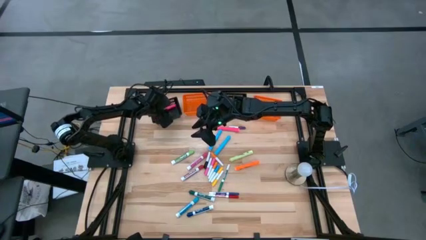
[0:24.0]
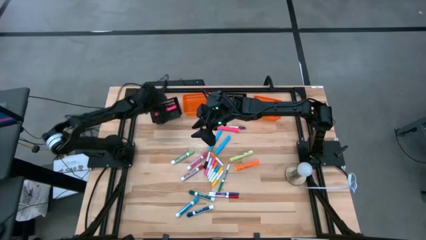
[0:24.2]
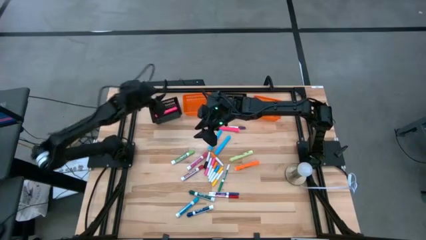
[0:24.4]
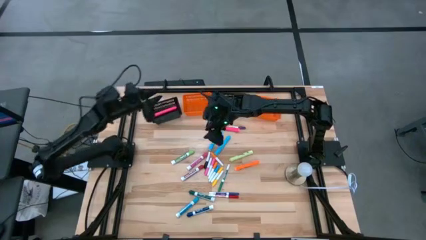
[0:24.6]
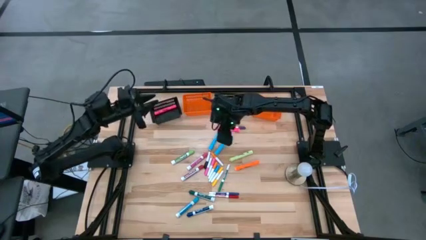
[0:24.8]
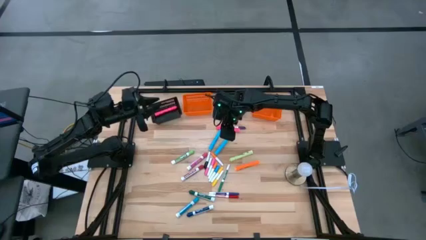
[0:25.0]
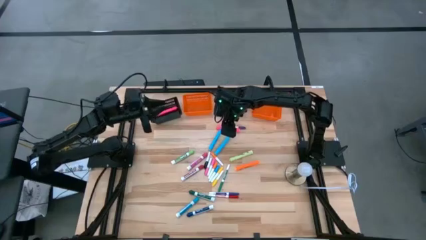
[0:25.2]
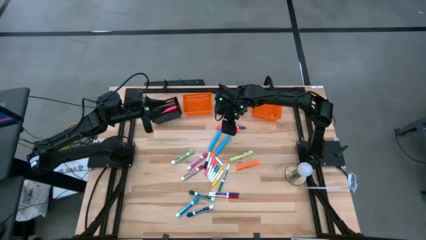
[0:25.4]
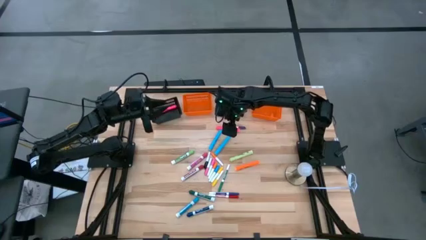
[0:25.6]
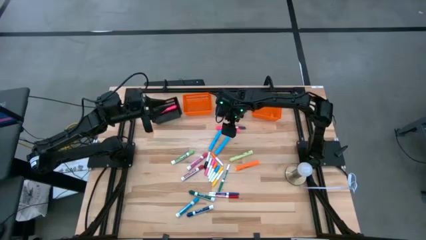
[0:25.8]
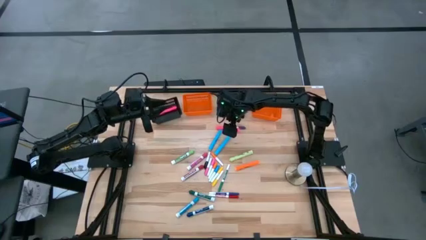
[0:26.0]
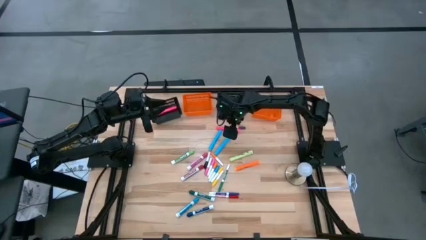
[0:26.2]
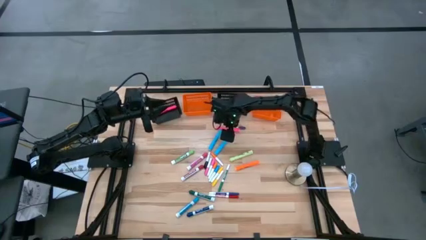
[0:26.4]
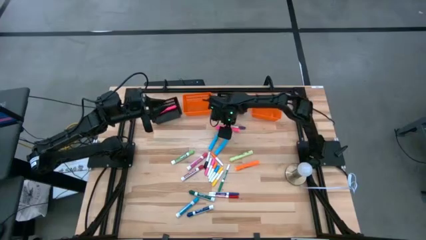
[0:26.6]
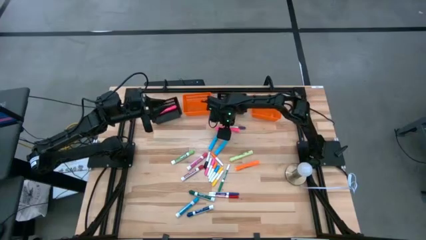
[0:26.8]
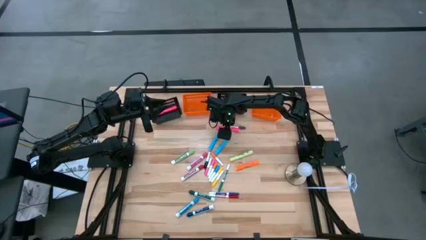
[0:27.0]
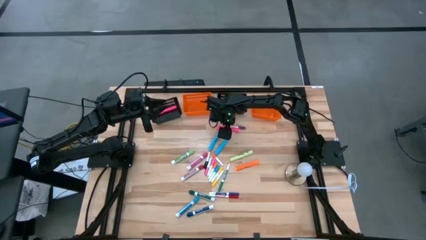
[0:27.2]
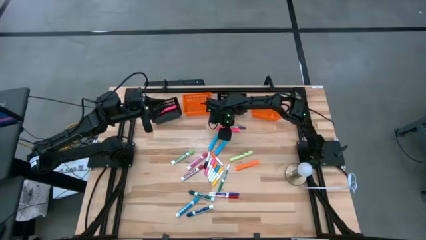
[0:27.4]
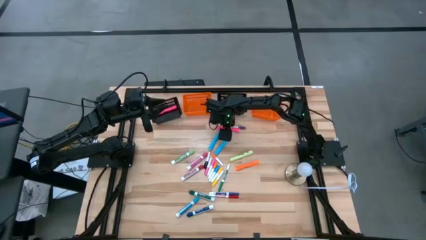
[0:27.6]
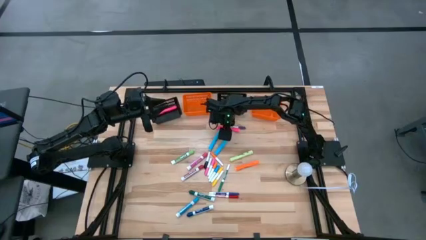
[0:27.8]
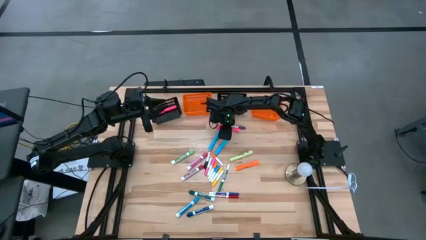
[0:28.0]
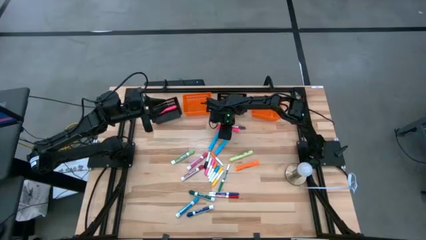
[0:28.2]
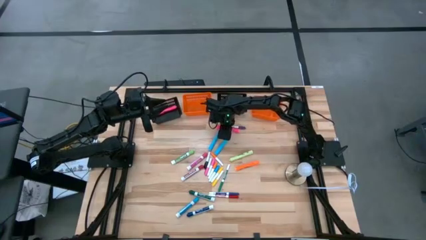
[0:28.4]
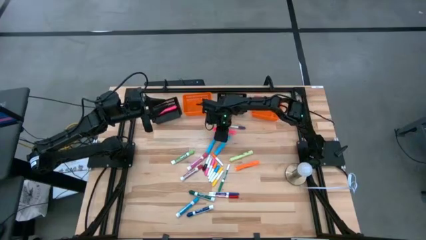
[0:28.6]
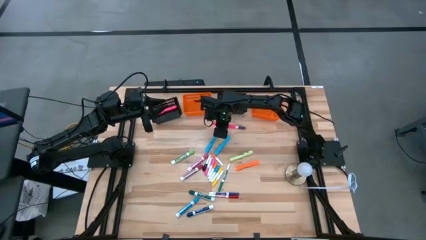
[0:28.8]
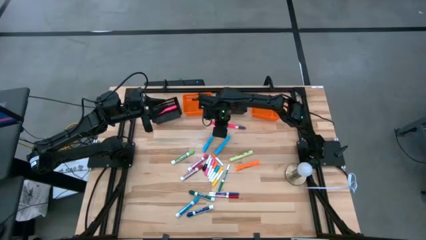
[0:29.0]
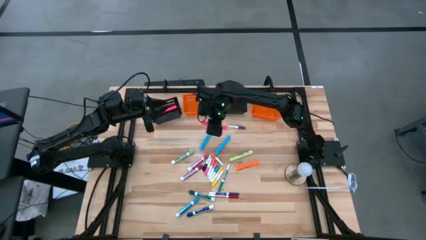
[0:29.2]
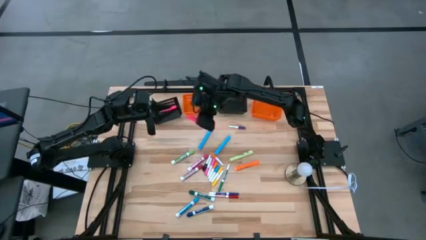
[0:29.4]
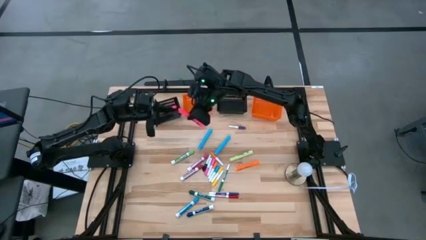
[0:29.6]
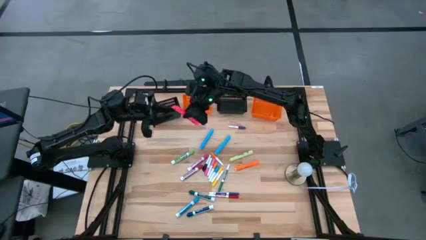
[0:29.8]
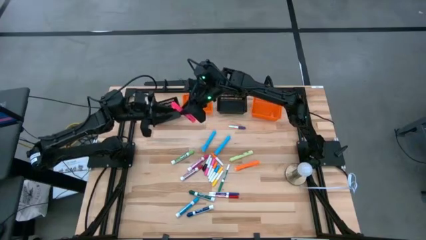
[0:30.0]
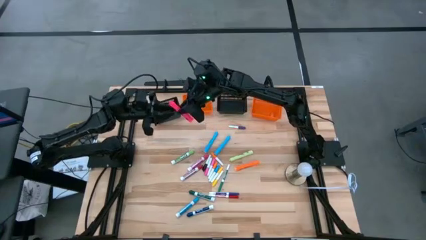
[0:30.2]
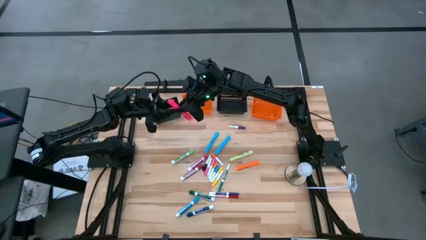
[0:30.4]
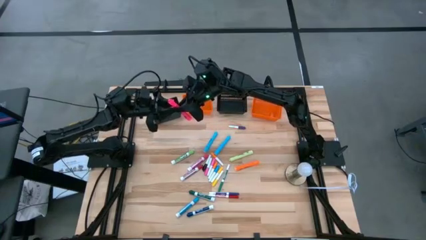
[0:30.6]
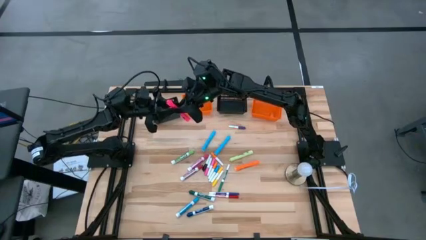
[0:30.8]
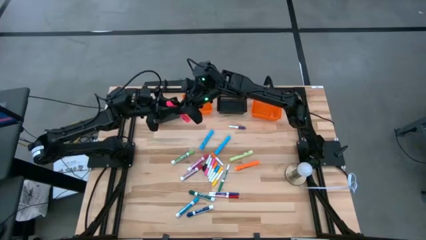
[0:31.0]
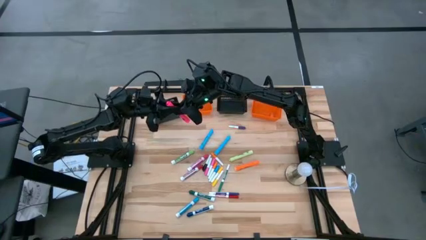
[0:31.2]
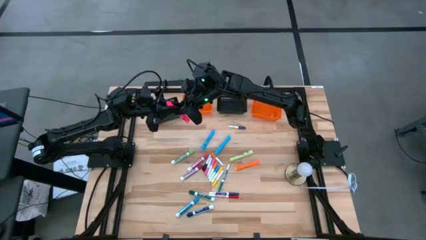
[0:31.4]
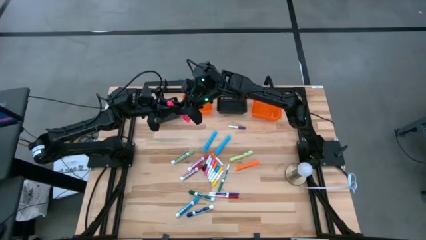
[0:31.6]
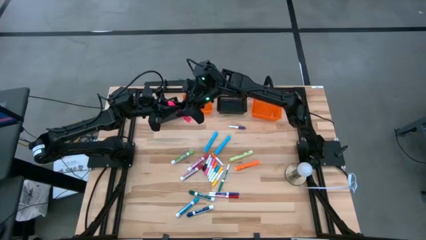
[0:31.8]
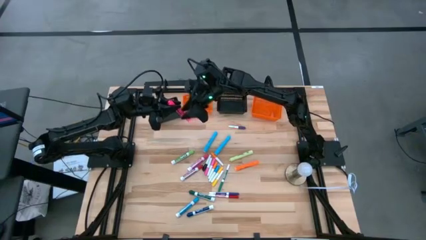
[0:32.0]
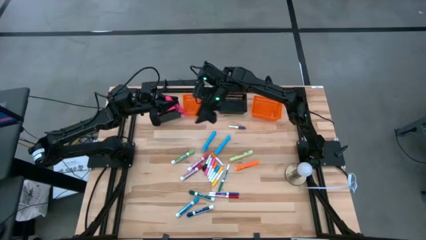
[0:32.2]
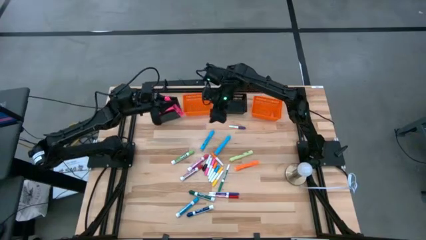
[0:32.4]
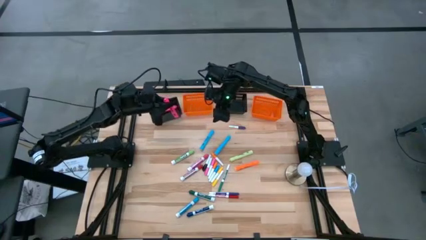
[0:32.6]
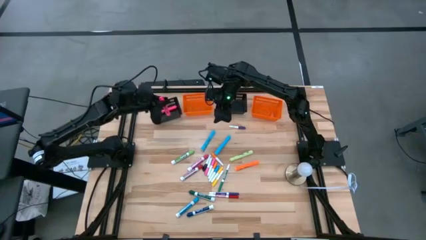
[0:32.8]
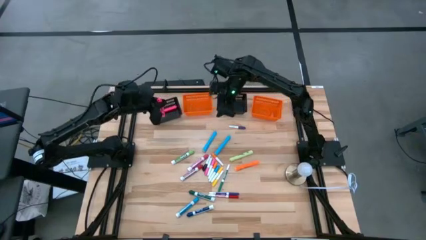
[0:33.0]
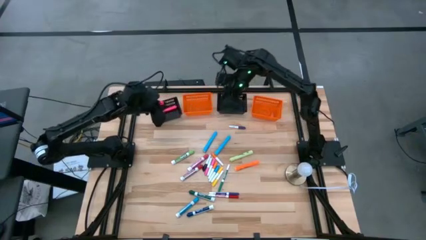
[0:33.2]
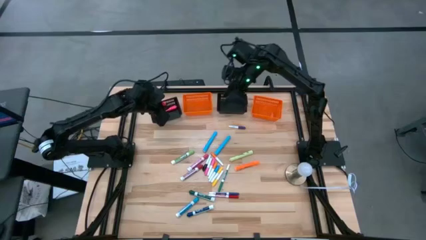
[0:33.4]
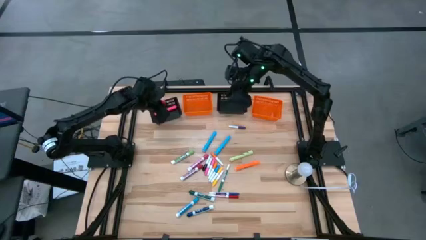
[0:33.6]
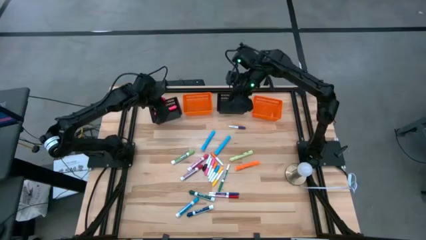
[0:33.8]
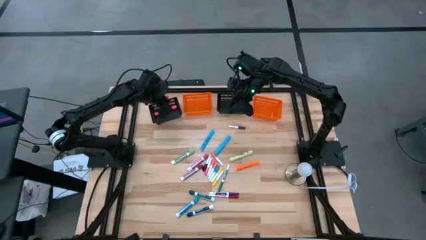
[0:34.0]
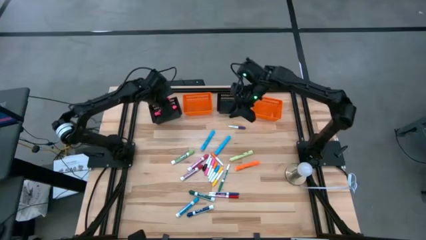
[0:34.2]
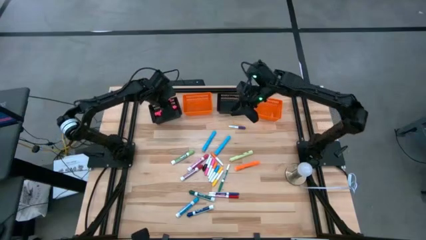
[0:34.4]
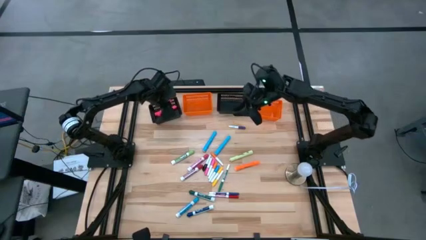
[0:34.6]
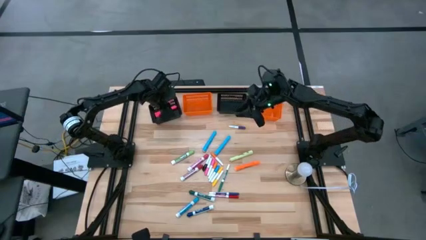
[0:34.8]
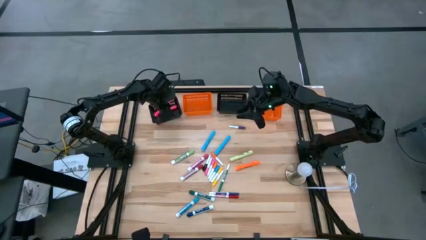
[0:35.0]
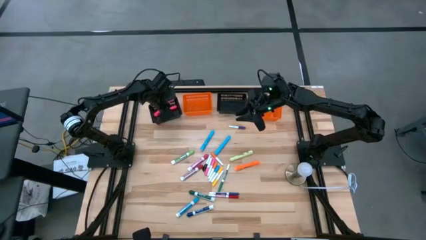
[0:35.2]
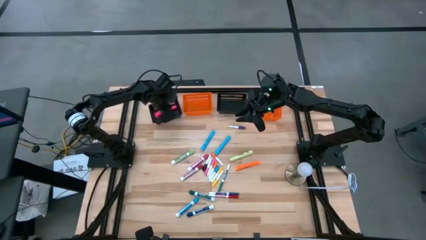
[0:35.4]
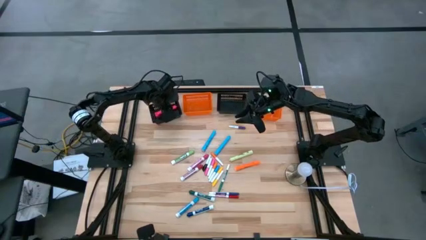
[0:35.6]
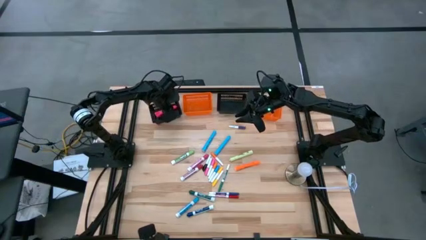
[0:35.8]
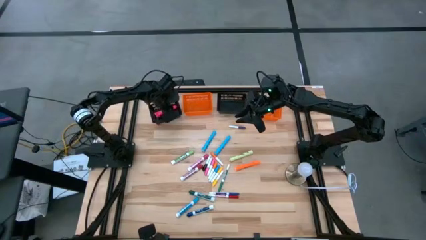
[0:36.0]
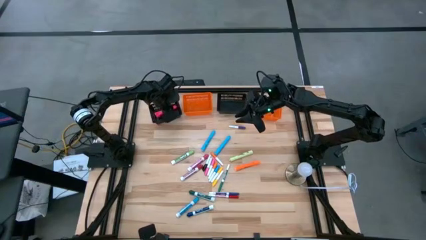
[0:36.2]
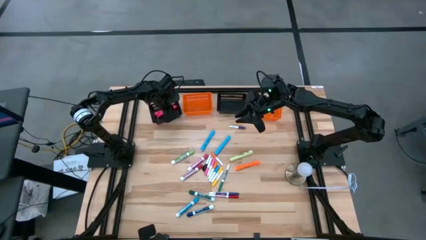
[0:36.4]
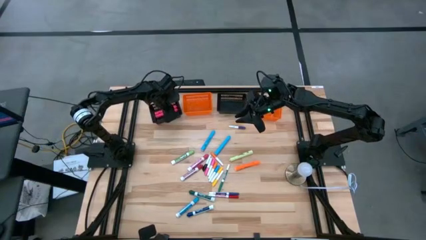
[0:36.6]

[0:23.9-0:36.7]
Task: Pick & Place Markers
Put the pink highlighter into the left black bin

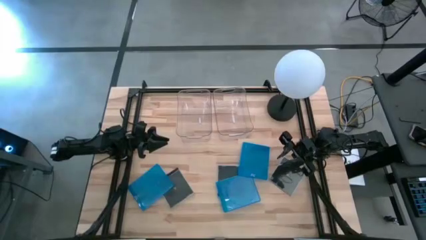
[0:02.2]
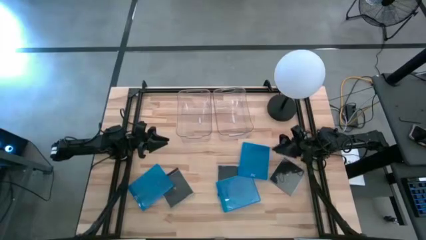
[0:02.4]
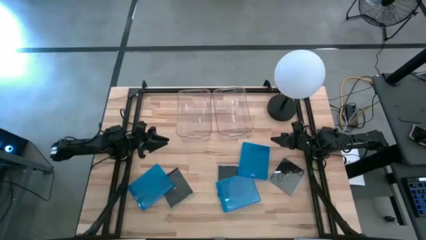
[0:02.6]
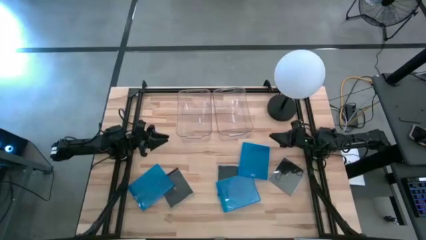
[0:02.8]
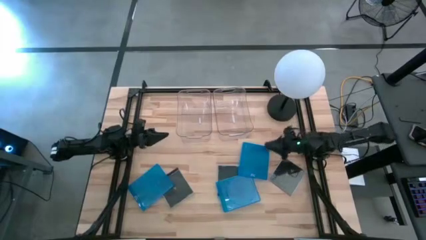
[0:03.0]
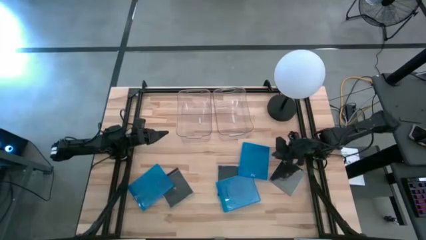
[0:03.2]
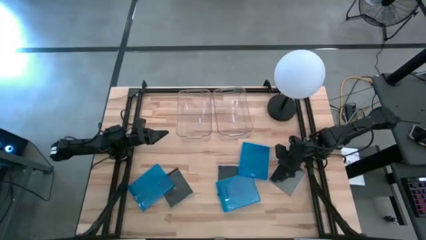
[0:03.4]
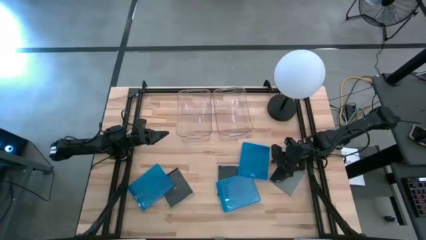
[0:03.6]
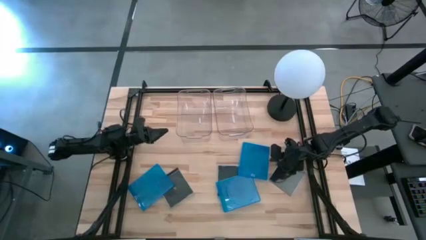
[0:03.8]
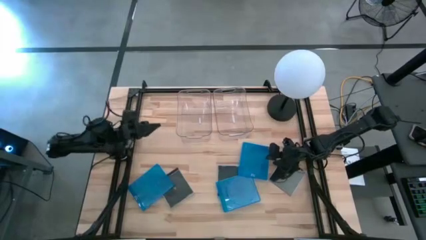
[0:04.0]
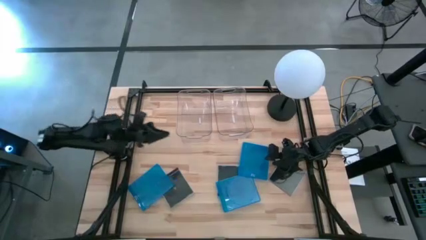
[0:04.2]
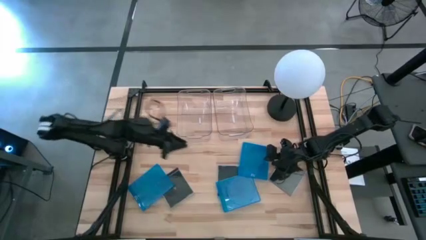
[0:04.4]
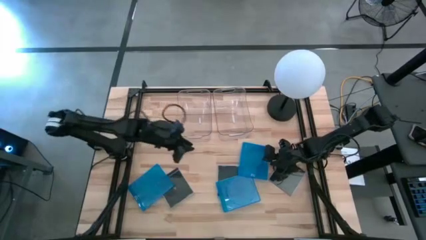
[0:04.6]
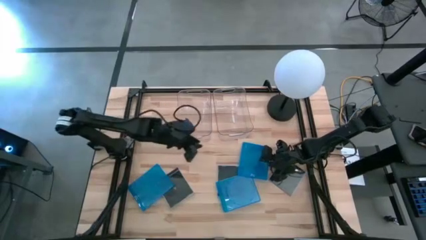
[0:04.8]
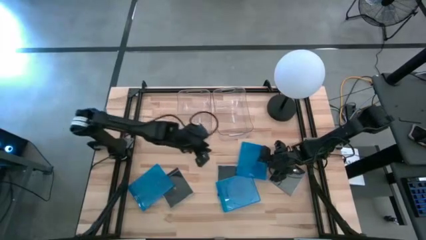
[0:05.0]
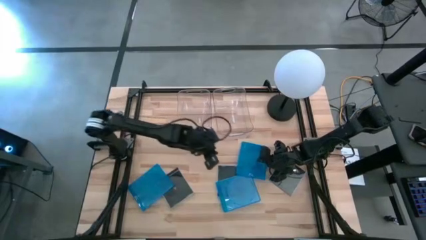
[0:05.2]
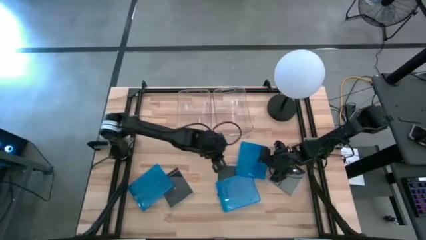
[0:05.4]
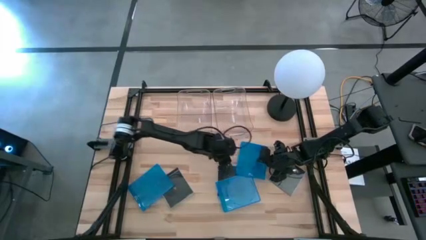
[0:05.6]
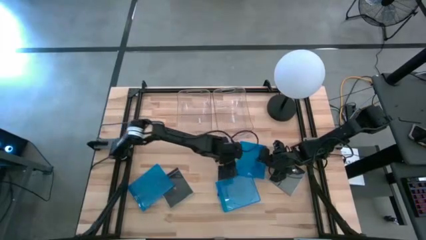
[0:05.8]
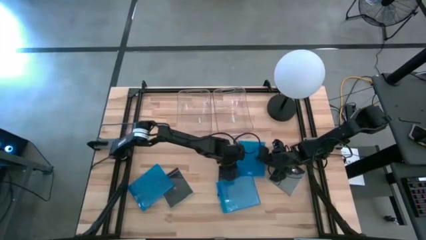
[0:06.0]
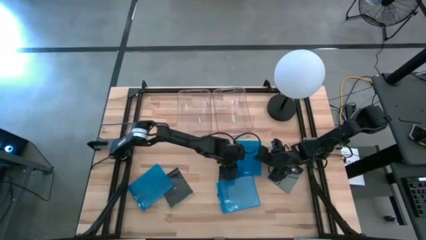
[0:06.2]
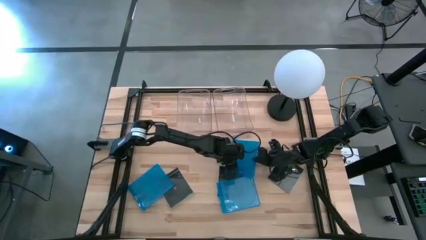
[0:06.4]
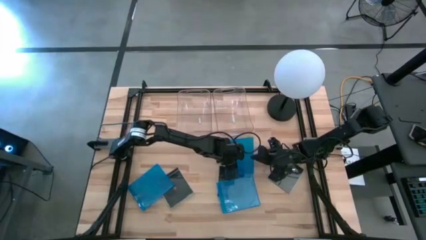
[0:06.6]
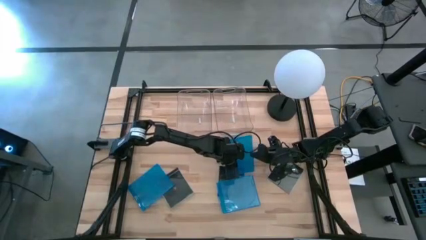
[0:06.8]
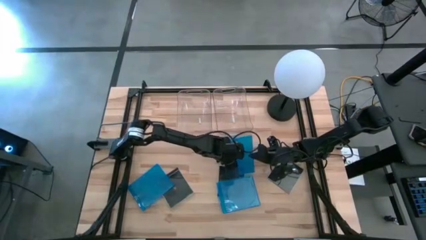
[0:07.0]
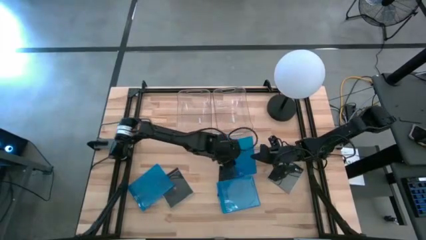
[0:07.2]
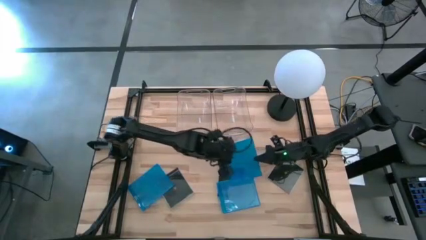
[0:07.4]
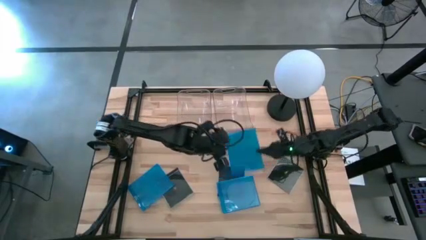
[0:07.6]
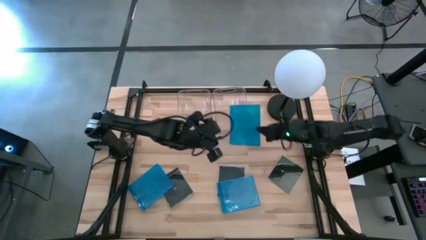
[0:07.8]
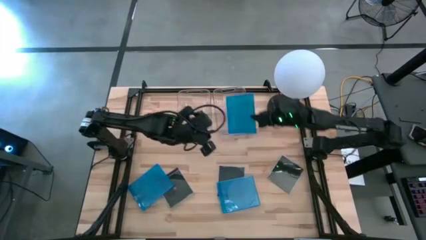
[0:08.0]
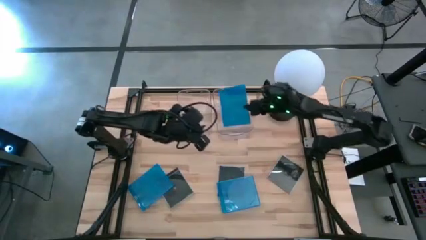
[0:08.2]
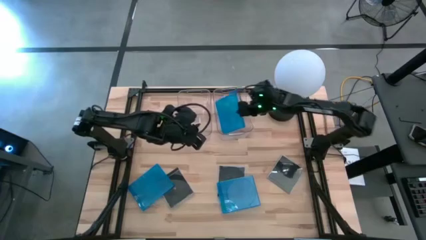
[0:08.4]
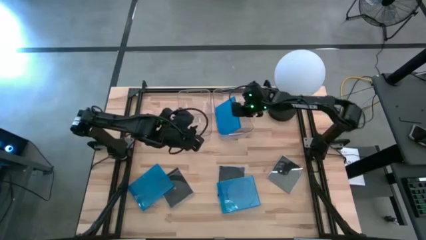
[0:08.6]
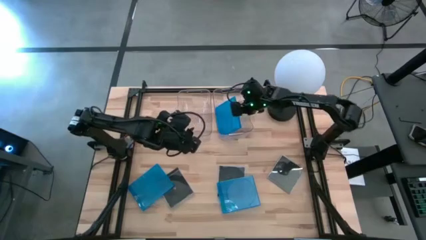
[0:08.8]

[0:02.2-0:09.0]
Task: Pick & place jewel cases by type
Put the top blue CD case into the right transparent bin
